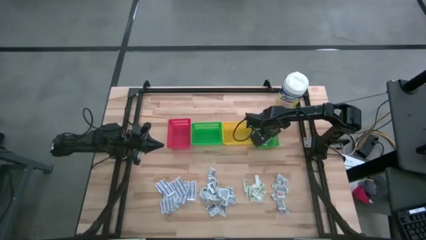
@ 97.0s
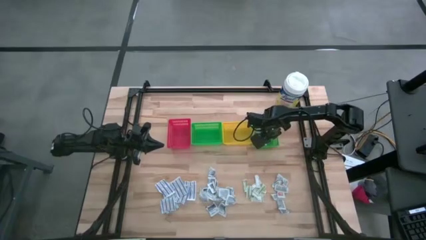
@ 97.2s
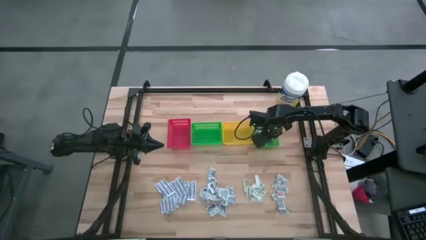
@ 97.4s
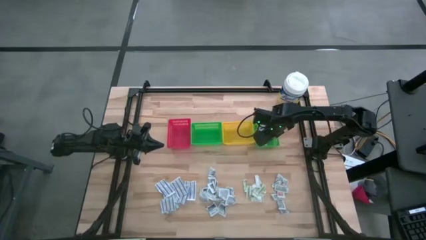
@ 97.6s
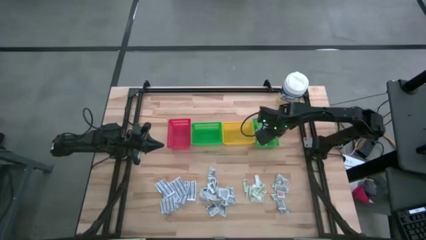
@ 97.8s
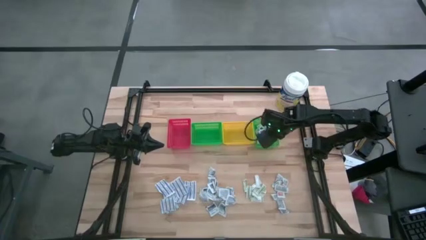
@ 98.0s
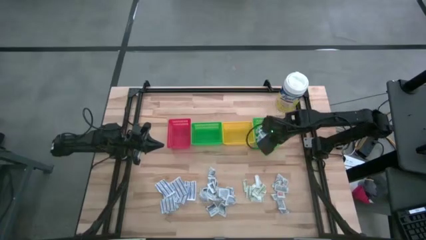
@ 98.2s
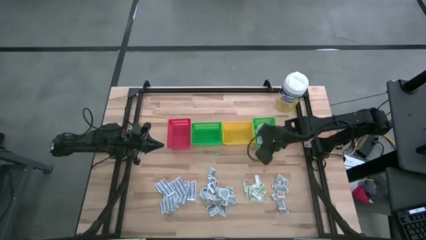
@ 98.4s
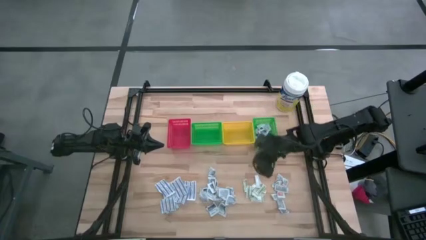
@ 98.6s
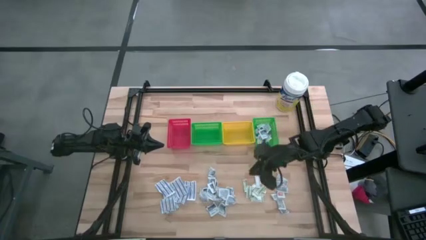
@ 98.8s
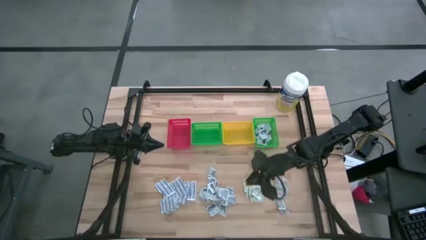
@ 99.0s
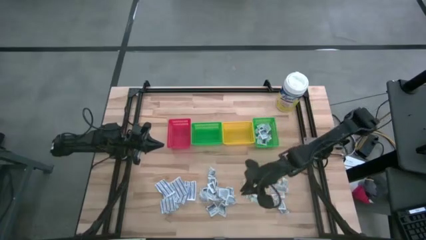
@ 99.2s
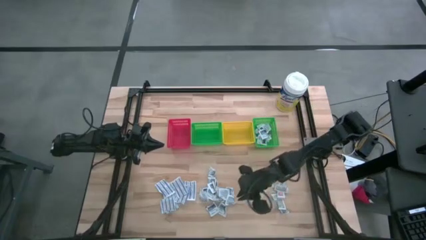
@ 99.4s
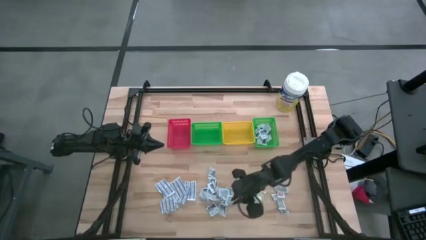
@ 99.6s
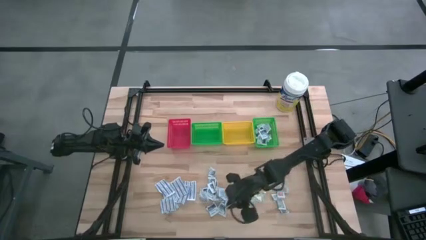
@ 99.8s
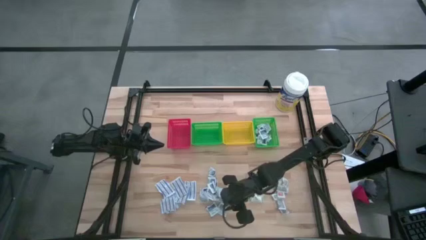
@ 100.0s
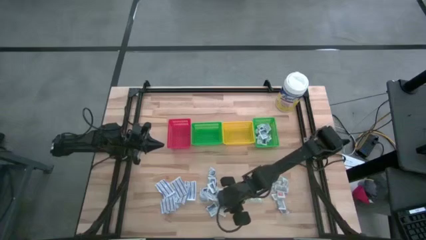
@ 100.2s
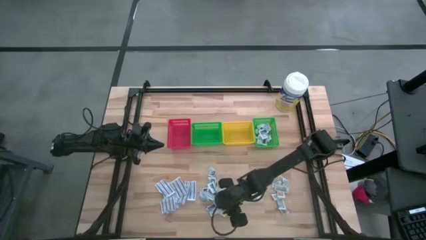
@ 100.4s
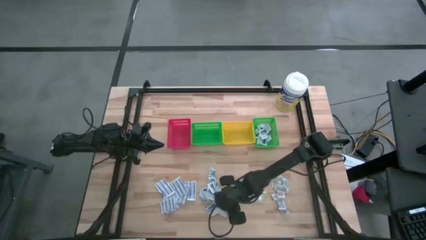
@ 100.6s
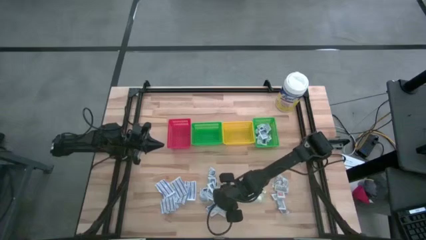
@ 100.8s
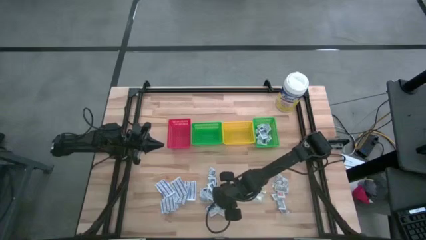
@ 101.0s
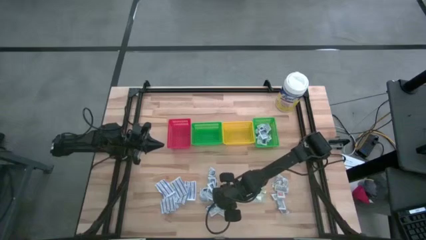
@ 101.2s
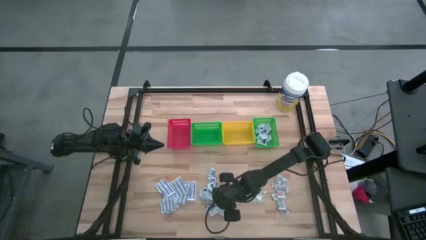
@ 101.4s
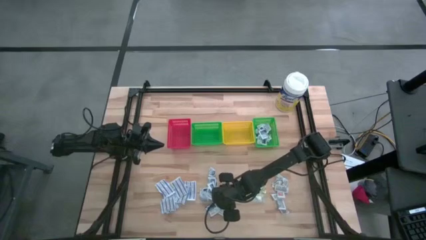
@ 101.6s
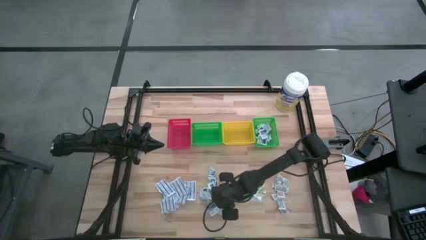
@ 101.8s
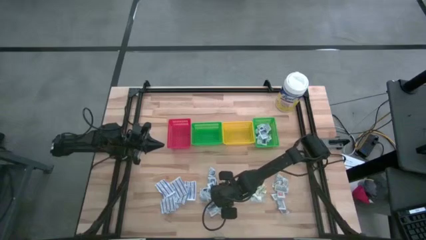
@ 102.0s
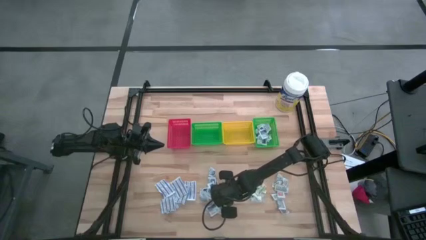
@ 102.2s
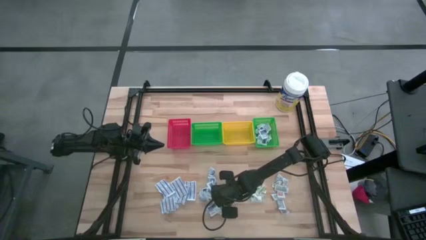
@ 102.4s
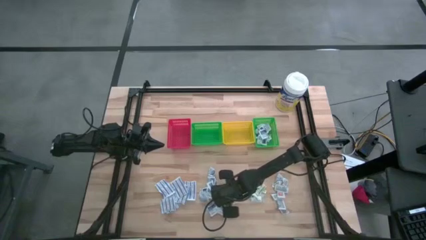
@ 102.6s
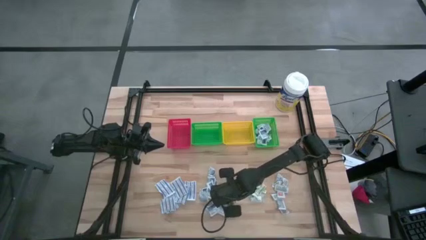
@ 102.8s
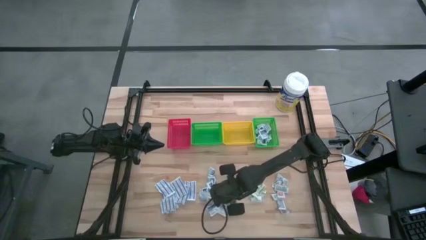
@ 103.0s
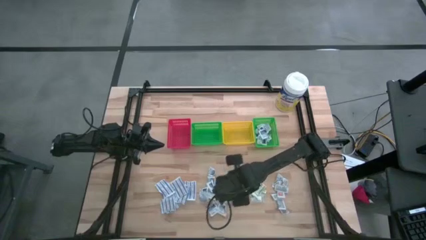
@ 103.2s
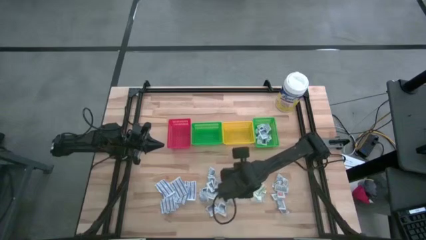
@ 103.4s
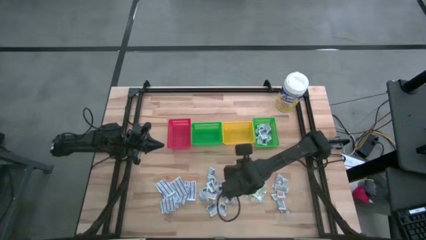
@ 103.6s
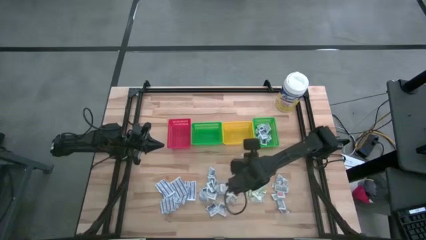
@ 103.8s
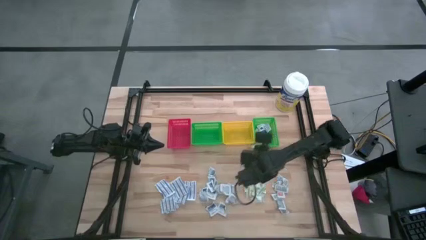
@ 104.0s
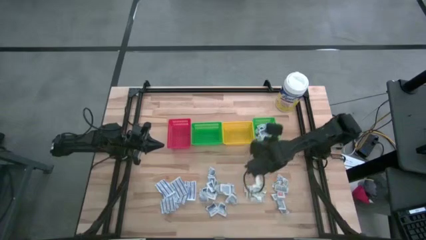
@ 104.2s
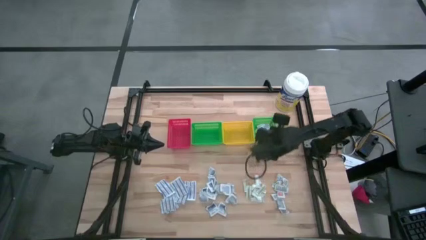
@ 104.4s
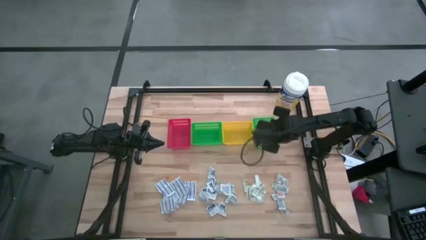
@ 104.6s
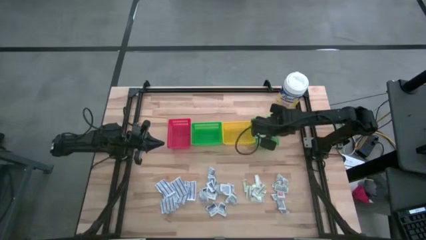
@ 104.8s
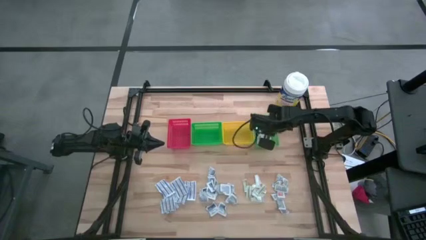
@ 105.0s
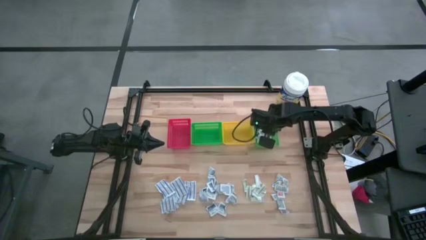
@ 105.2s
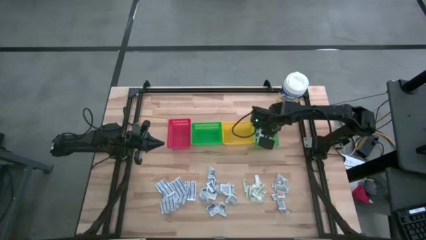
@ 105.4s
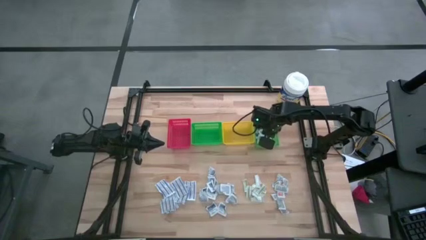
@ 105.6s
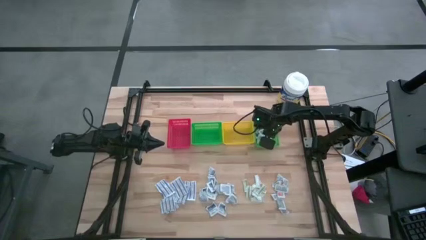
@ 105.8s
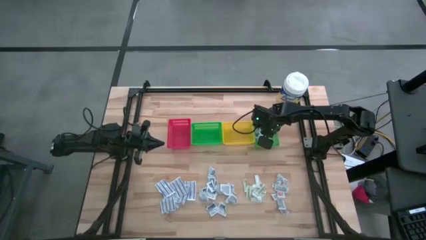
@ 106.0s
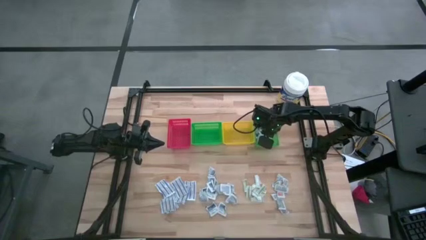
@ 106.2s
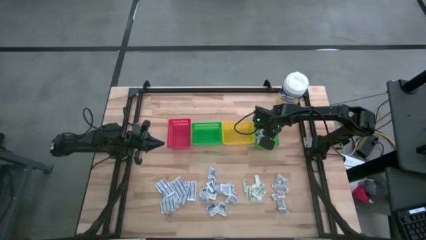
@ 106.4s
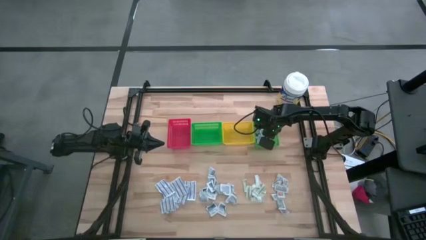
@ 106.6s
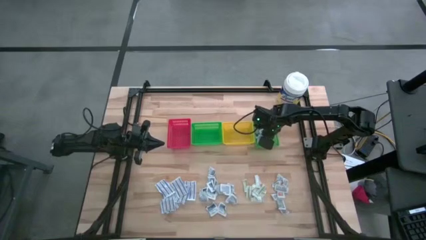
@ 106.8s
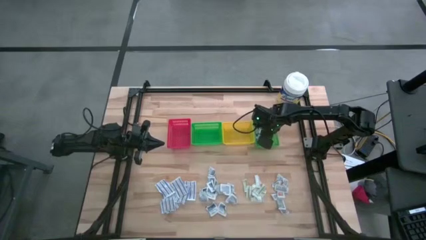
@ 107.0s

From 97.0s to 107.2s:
Task: Pick & Place First Aid Supplies
Put the blue alcohol pad into the right green bin

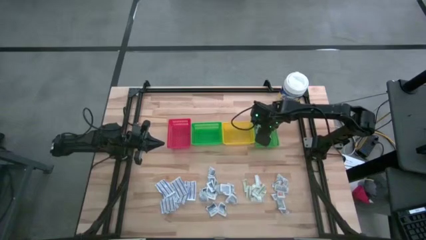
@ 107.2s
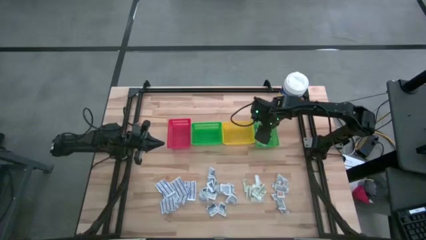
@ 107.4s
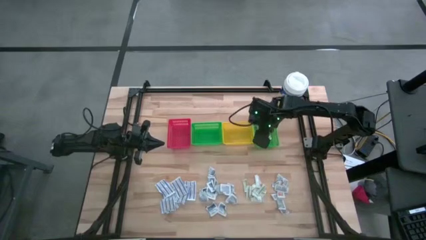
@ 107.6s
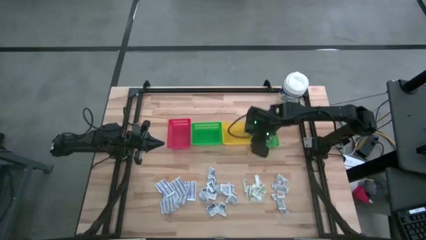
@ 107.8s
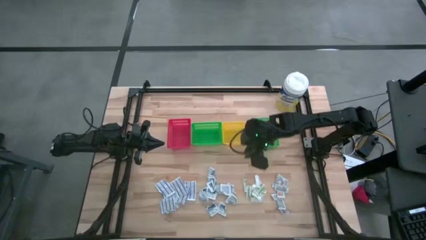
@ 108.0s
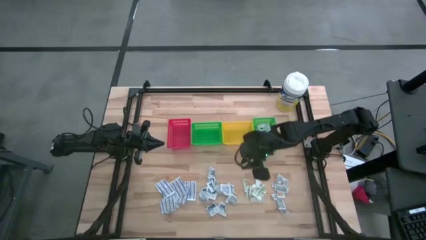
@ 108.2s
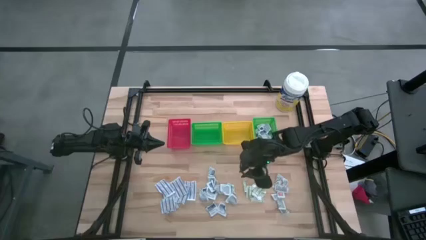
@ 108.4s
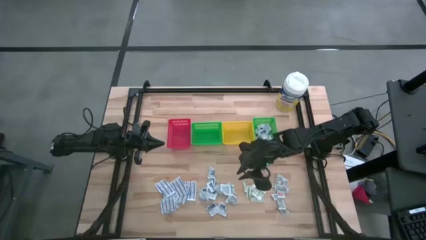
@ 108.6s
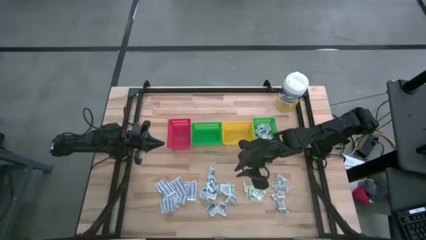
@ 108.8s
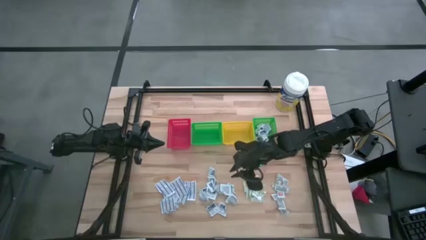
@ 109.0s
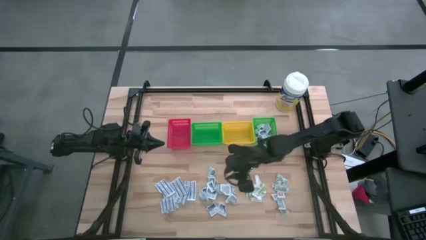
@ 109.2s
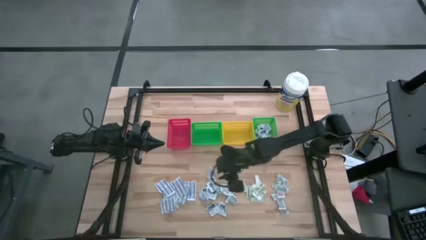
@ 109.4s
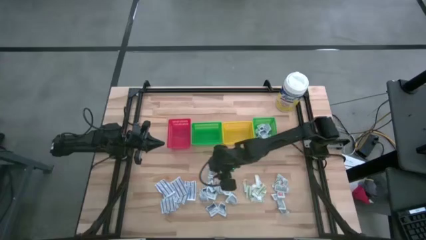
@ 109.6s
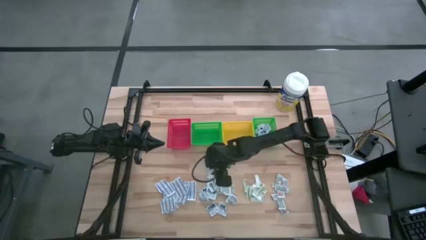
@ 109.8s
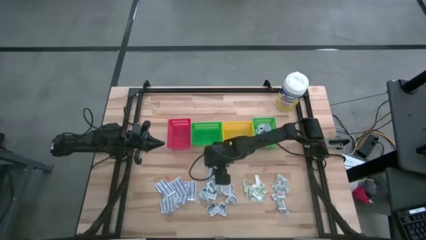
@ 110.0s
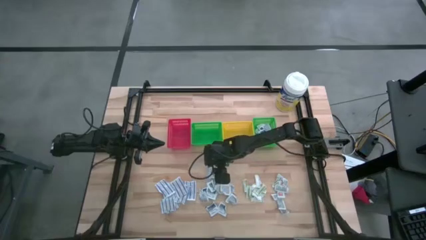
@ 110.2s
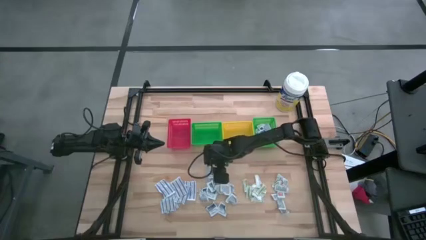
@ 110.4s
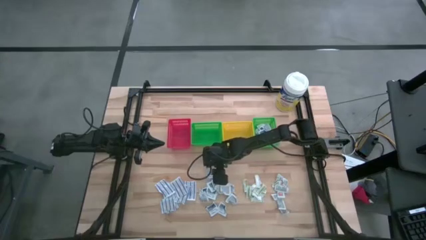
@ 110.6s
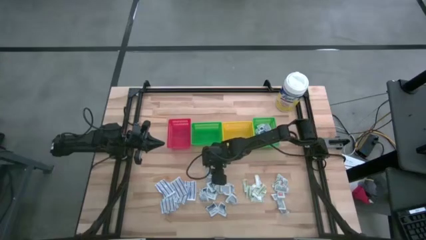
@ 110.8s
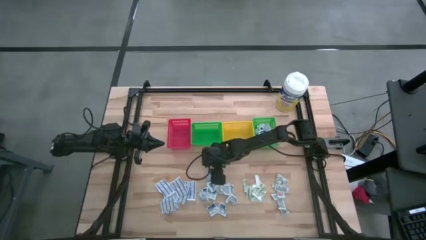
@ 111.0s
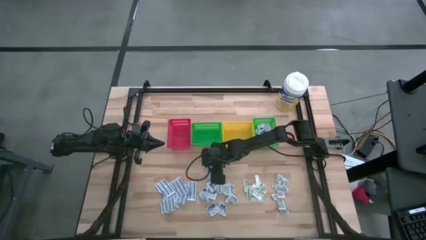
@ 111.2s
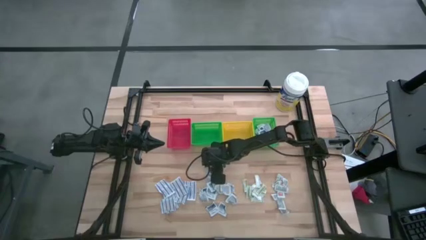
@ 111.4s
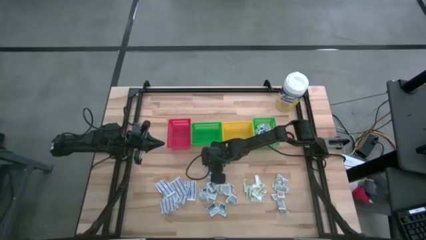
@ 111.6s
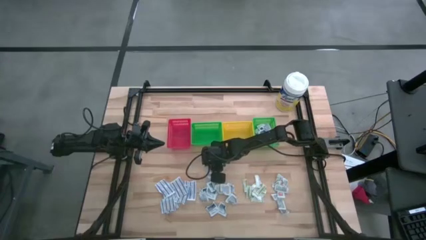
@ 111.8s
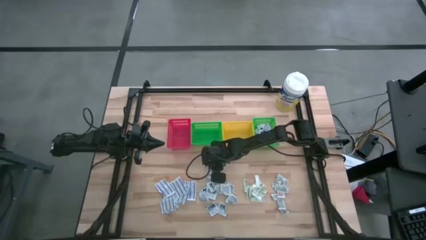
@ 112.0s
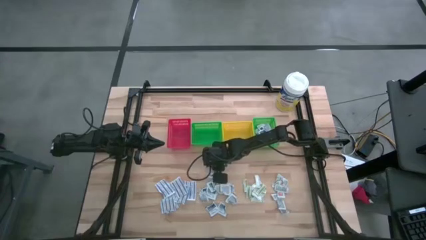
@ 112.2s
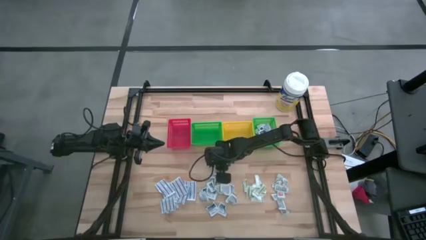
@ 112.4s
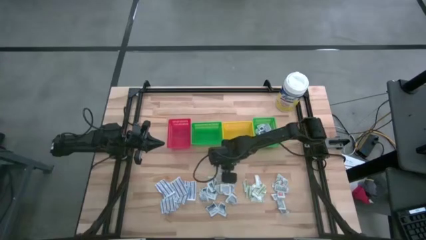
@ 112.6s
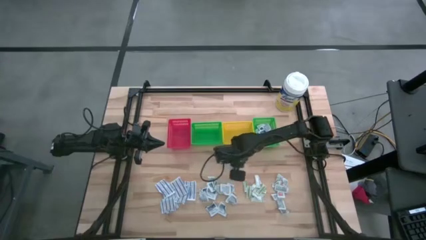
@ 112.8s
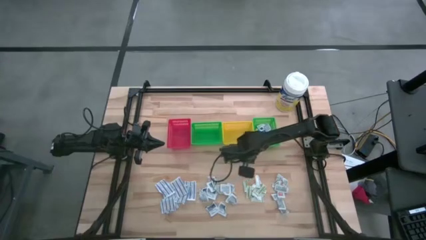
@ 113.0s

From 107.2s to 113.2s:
Put the blue alcohol pad into the right green bin
